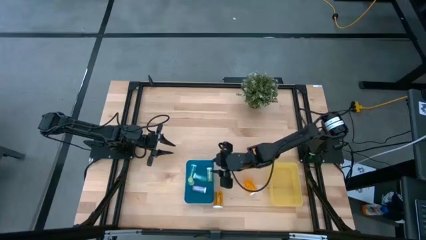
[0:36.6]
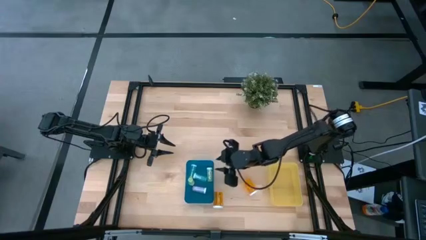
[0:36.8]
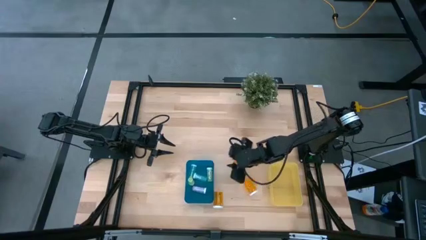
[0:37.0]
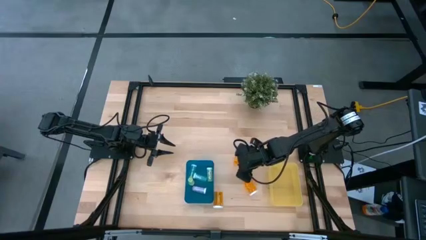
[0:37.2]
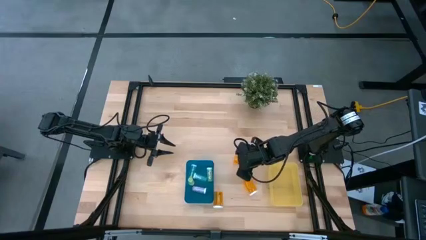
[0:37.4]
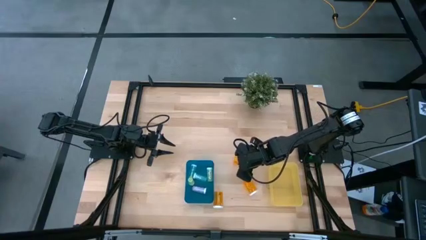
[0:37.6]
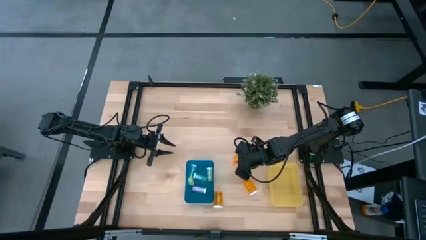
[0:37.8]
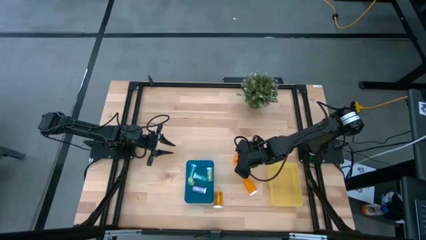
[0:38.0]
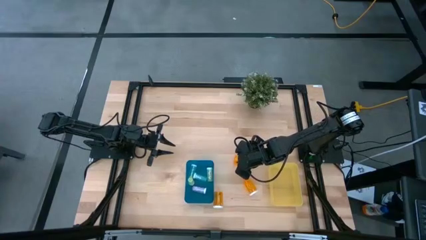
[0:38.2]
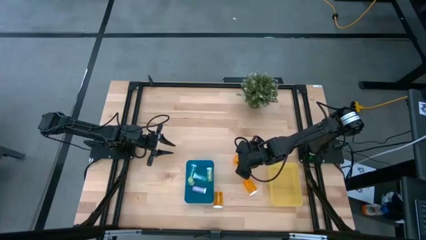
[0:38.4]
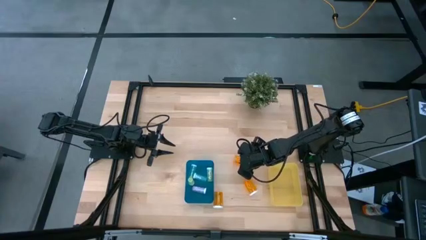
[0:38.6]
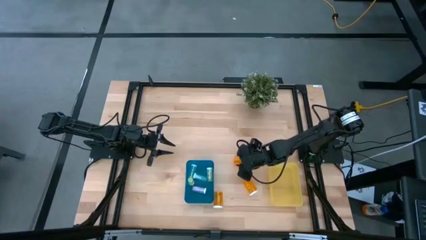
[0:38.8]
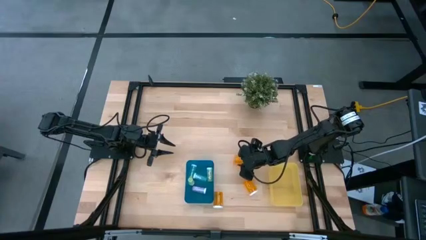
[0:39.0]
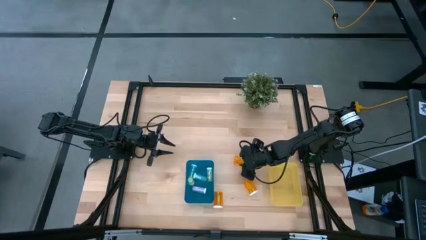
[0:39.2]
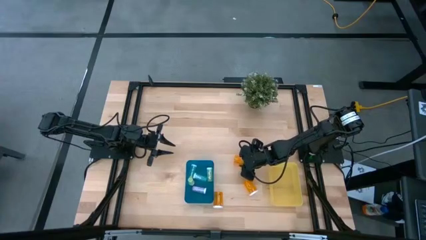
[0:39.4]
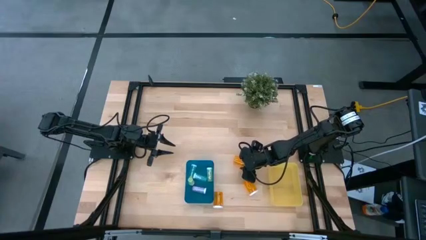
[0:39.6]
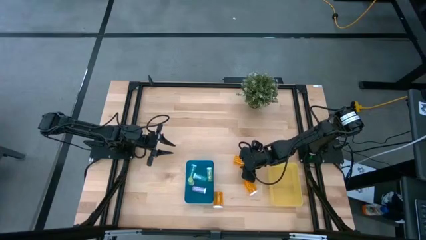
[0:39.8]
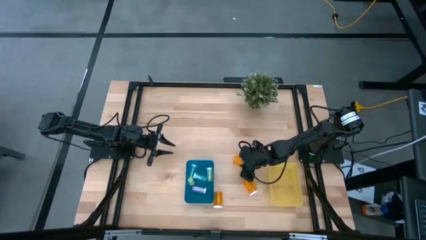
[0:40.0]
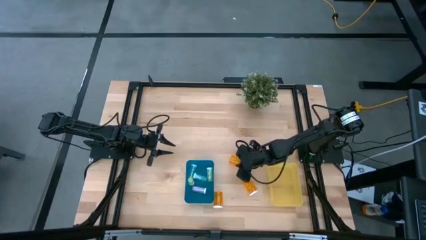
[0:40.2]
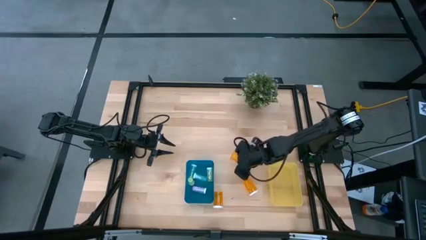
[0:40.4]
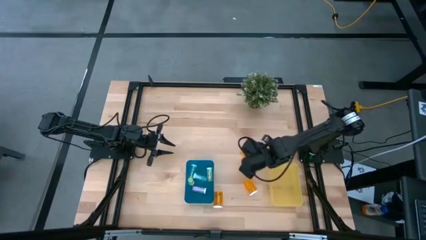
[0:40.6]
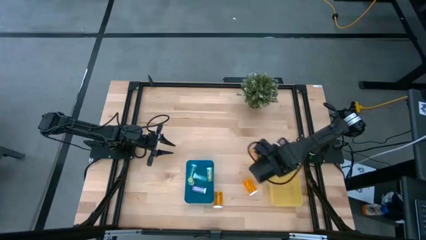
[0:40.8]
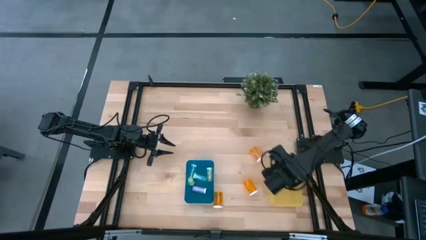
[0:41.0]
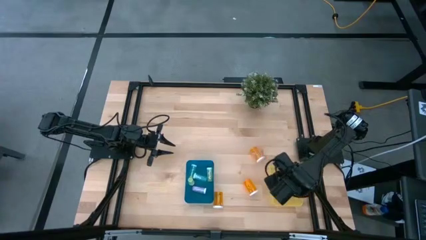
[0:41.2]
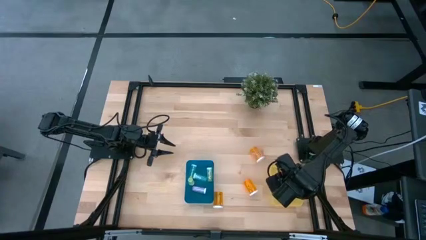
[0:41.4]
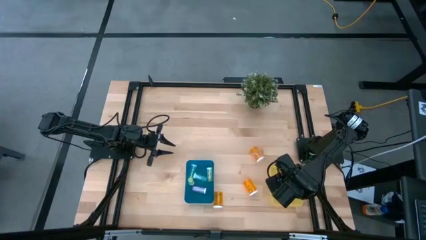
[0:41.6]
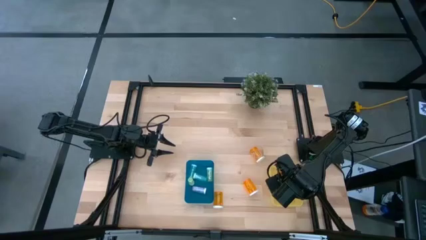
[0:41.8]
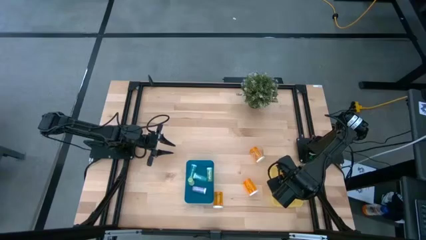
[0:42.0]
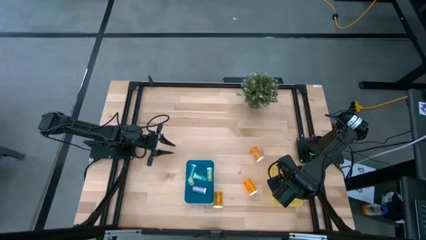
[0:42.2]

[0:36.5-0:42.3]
Task: Pick and place medicine bottles into bin by pill shape (circle, oval)
Put the large orange pill bottle into the yellow bin

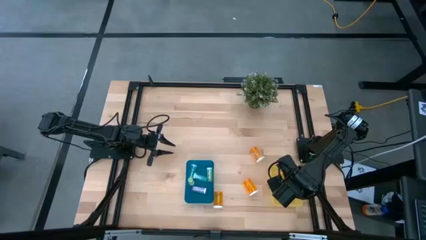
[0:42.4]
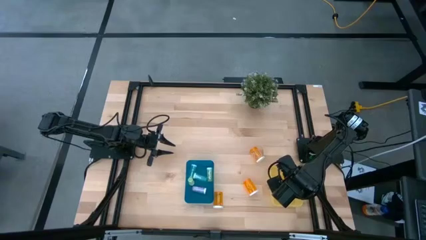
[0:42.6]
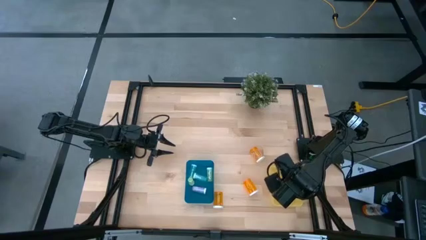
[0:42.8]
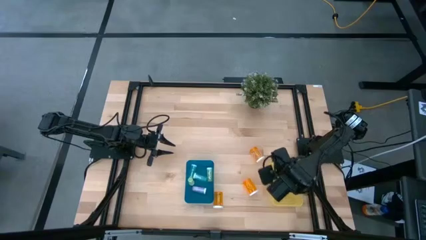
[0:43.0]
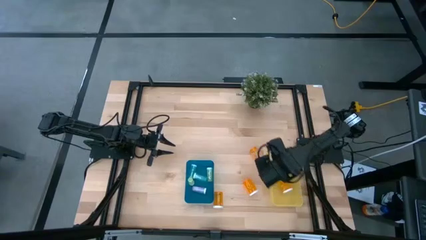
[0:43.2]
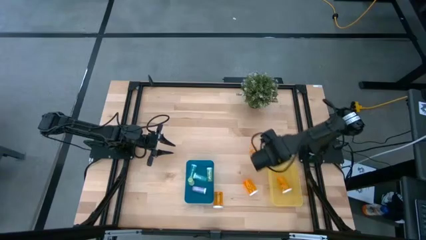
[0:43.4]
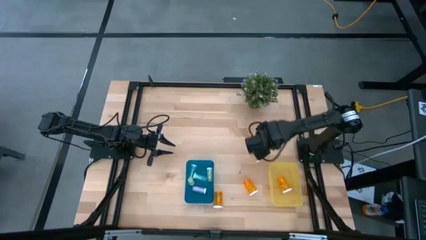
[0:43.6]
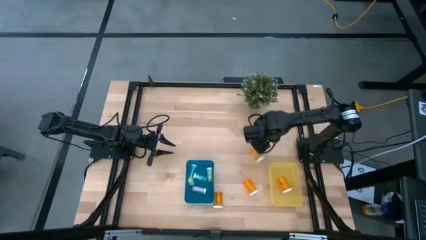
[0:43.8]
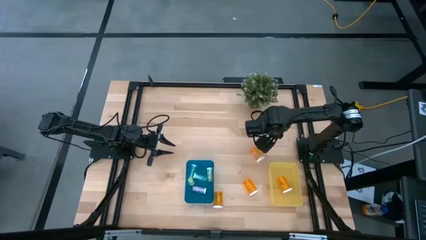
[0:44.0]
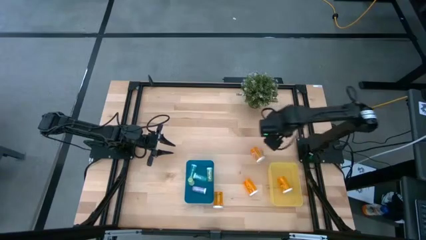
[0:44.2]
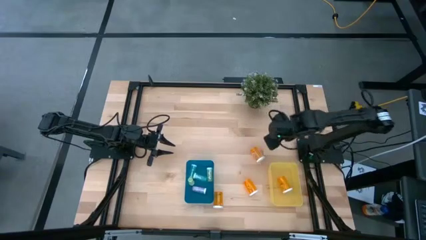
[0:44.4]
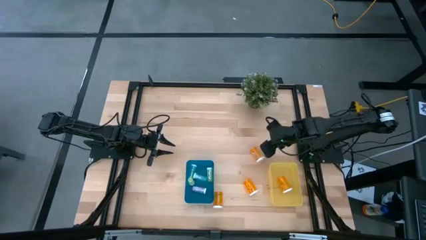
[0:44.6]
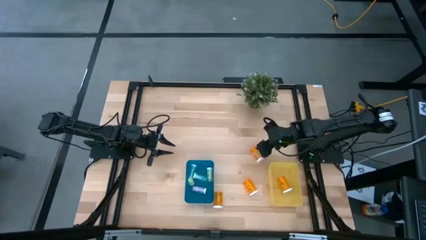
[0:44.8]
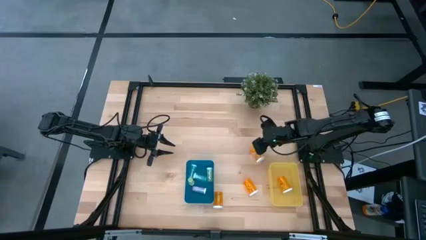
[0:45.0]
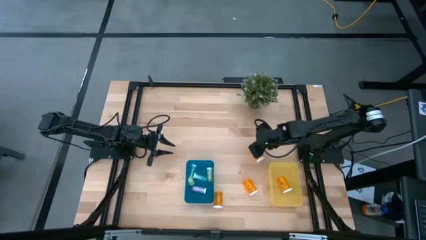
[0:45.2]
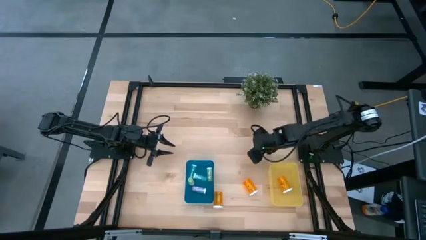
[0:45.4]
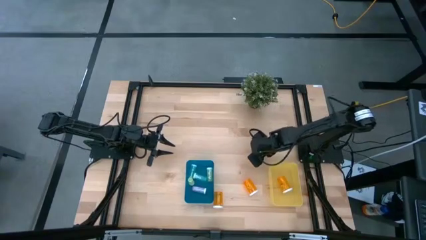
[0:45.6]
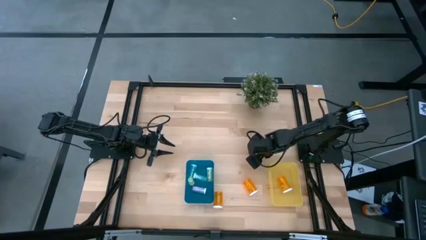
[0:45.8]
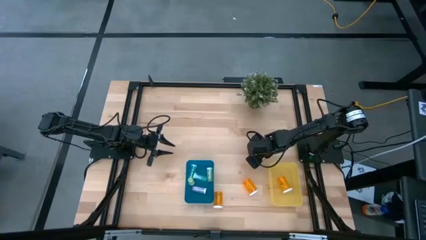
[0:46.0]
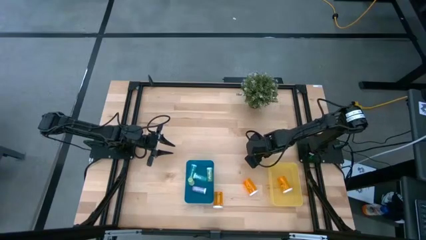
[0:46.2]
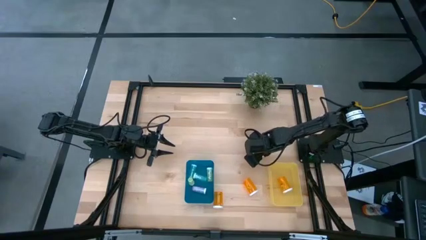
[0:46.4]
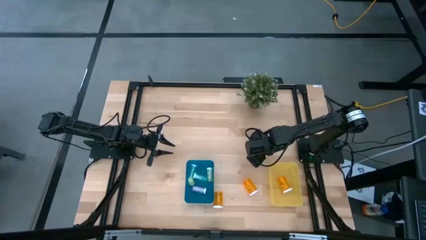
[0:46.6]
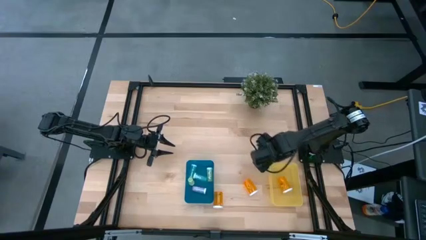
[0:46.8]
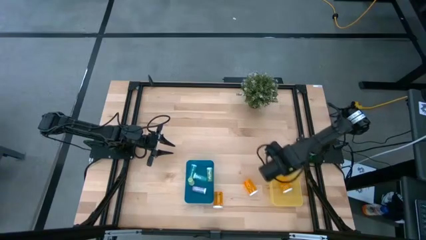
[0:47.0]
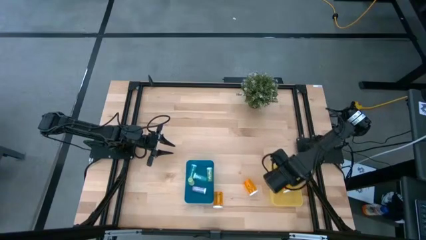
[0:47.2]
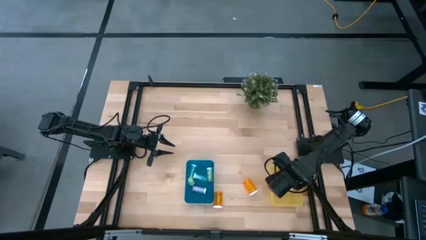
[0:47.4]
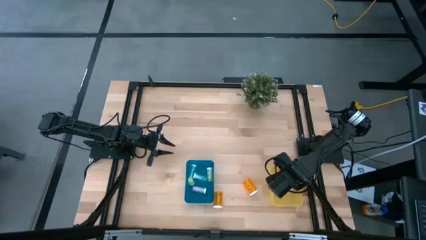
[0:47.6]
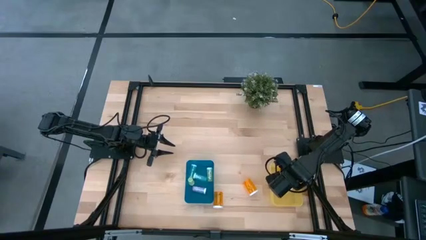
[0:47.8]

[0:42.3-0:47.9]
Put the large orange pill bottle into the yellow bin

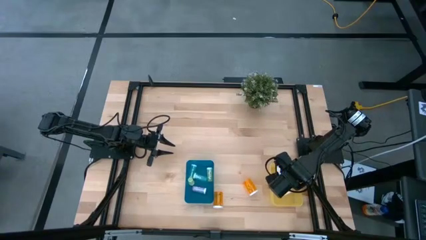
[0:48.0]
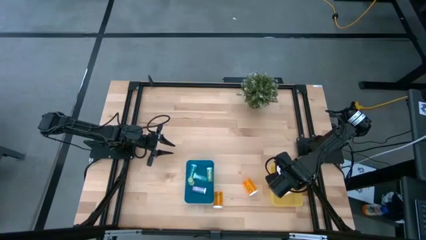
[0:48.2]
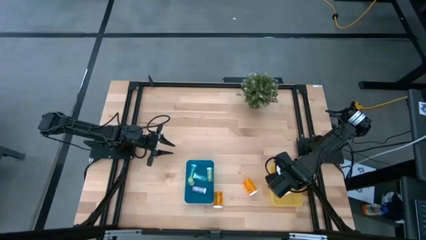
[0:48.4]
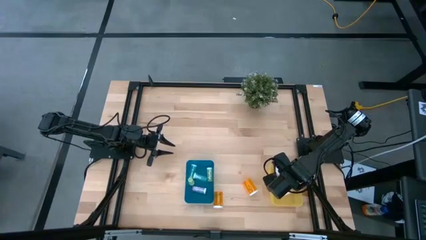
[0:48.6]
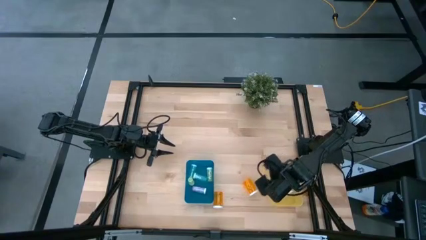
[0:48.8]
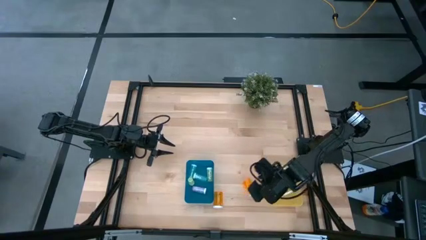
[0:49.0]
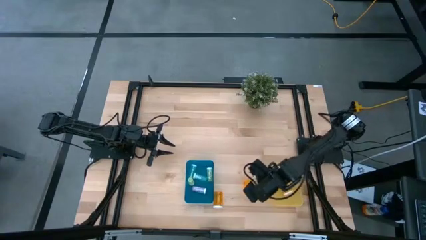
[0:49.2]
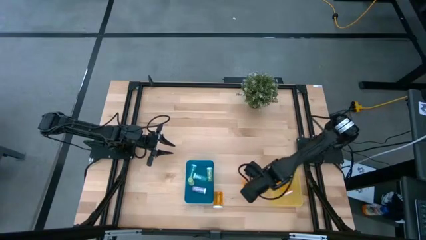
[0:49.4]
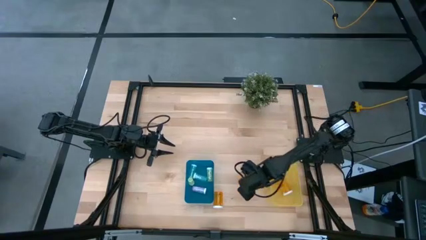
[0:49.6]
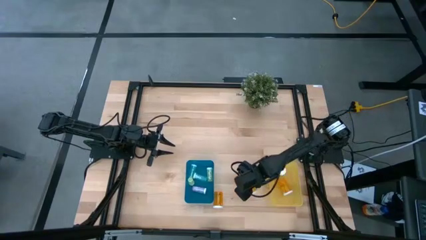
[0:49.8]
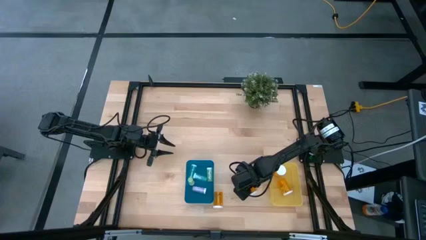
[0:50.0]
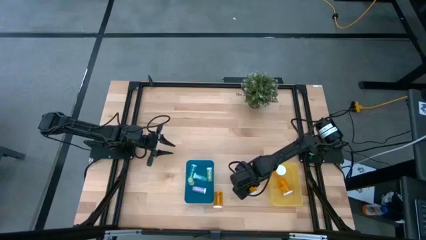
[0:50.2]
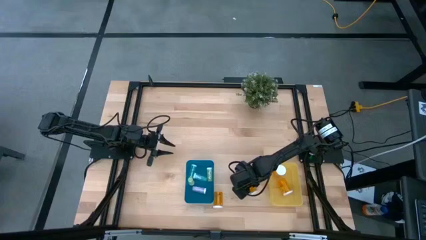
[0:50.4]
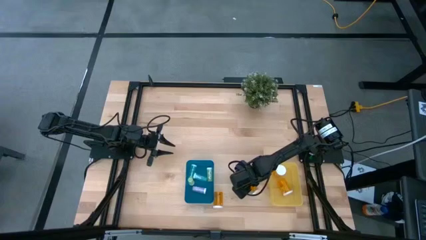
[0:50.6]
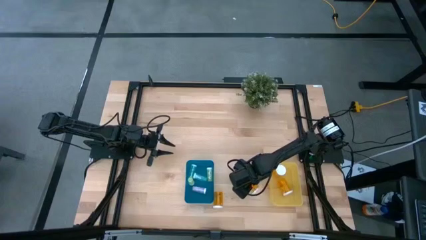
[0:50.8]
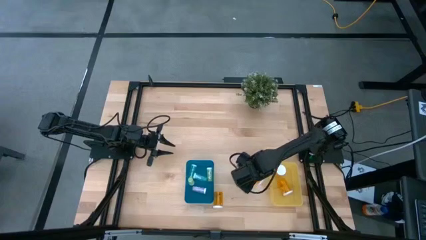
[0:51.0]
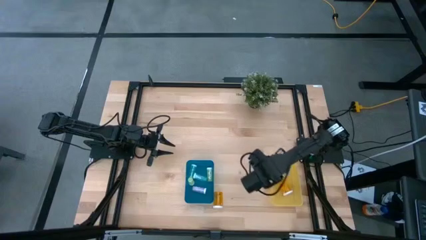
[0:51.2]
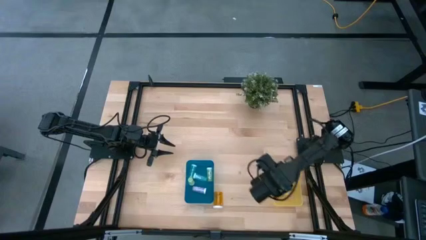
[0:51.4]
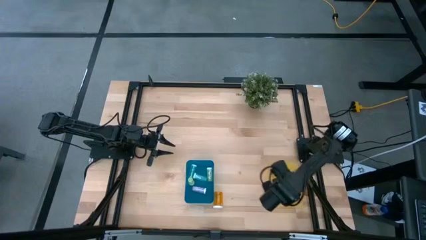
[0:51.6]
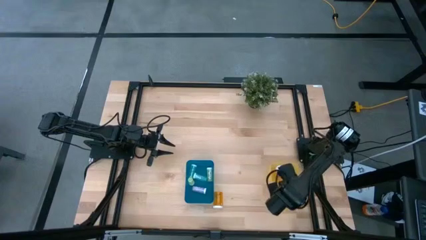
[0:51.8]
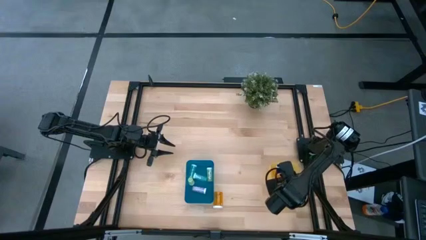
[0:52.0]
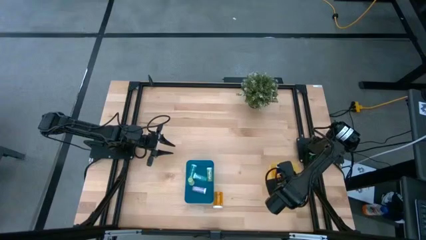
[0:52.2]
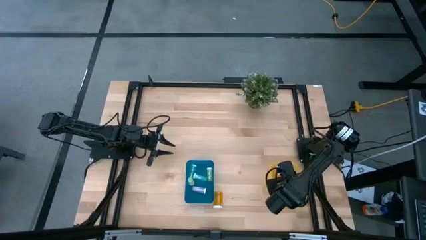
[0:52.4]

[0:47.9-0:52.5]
Put the large orange pill bottle into the yellow bin
